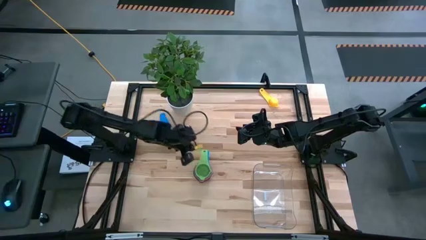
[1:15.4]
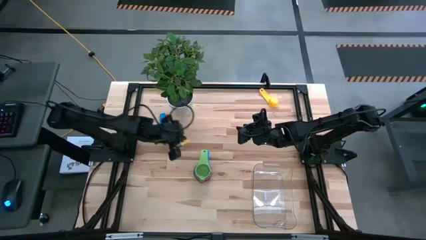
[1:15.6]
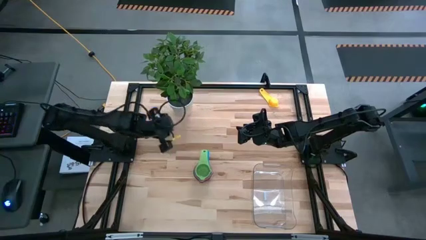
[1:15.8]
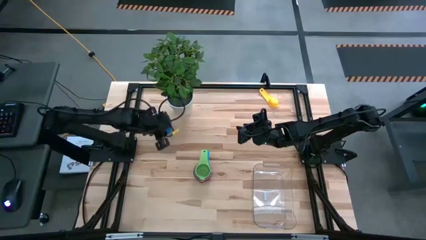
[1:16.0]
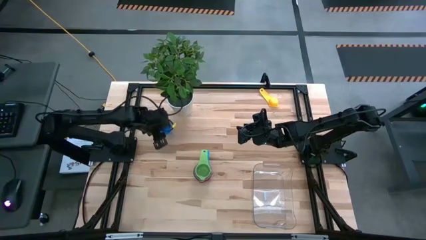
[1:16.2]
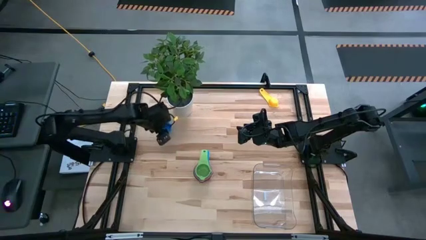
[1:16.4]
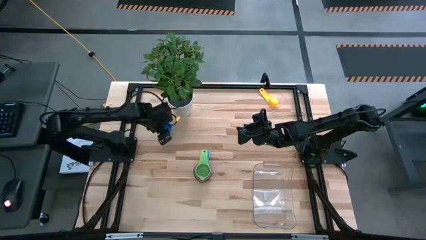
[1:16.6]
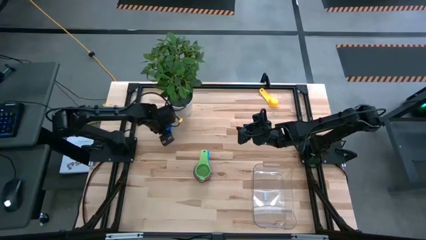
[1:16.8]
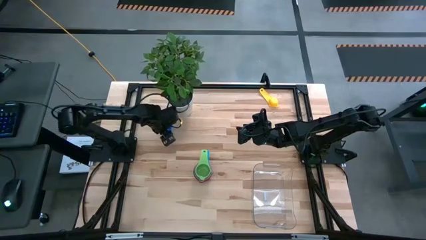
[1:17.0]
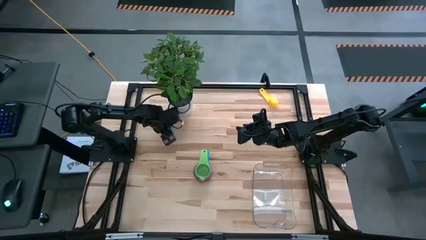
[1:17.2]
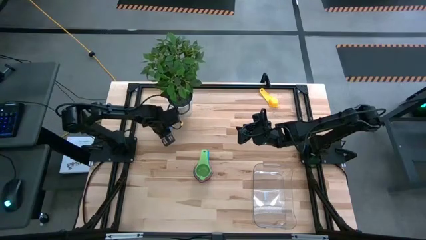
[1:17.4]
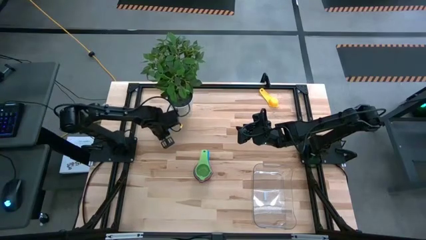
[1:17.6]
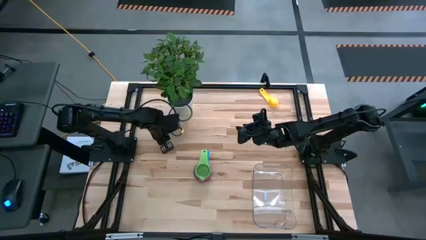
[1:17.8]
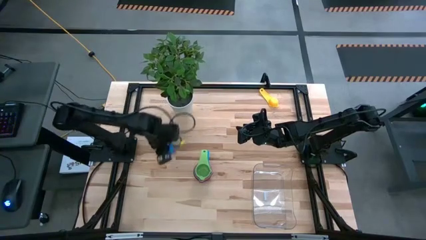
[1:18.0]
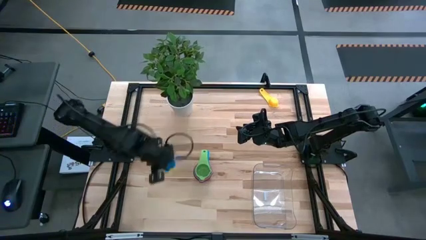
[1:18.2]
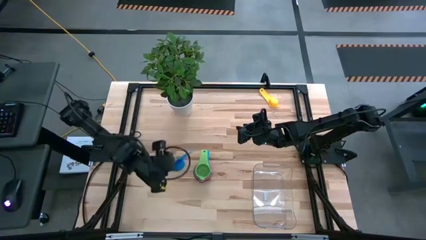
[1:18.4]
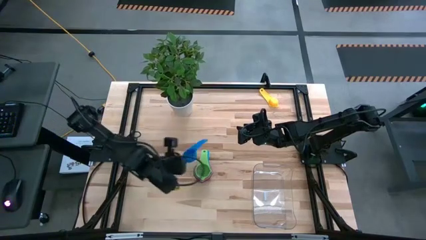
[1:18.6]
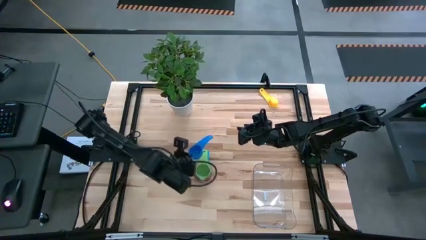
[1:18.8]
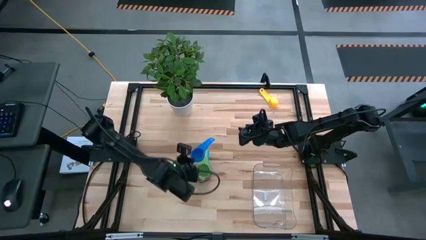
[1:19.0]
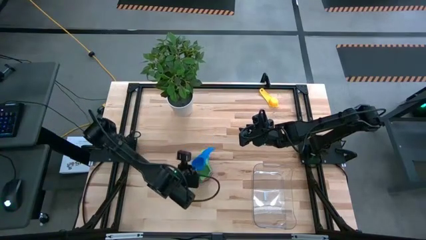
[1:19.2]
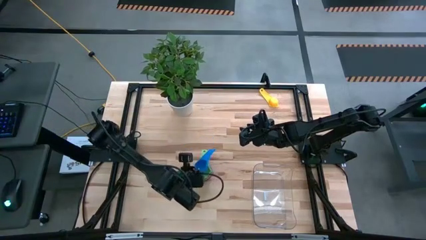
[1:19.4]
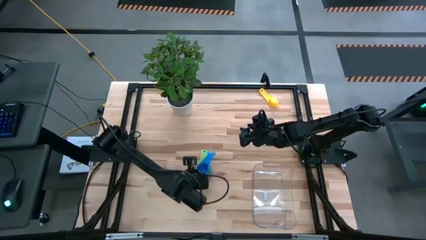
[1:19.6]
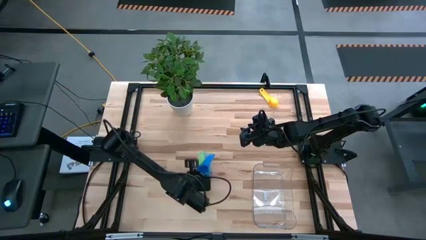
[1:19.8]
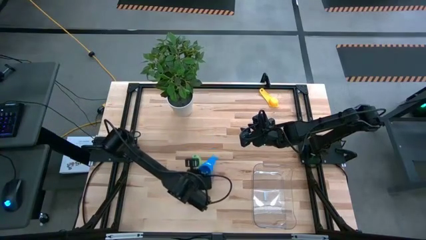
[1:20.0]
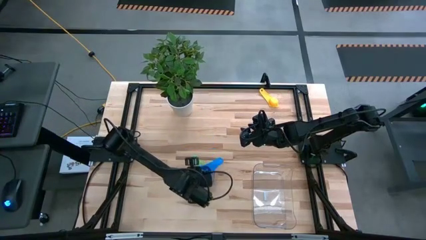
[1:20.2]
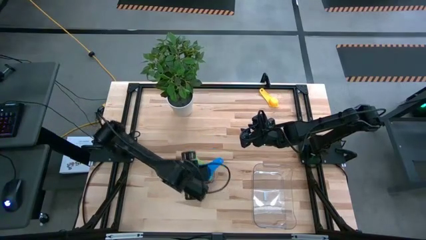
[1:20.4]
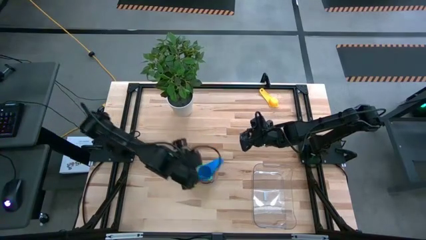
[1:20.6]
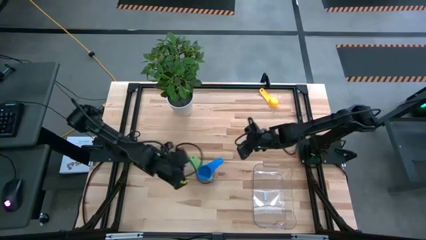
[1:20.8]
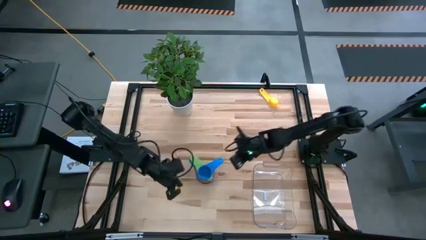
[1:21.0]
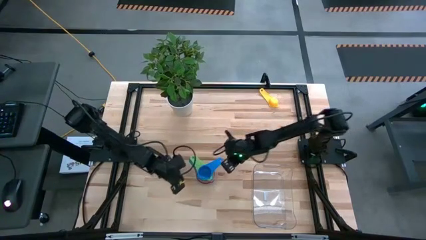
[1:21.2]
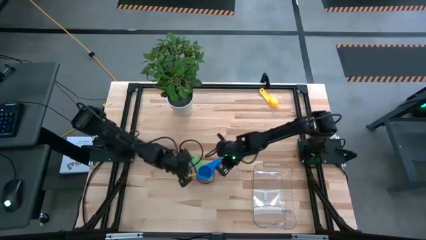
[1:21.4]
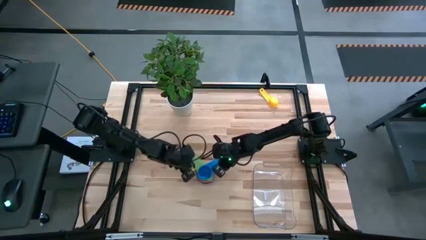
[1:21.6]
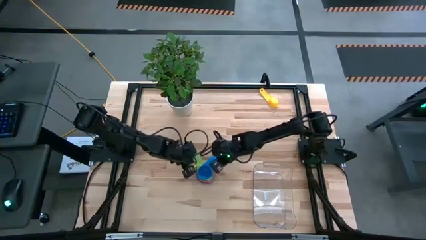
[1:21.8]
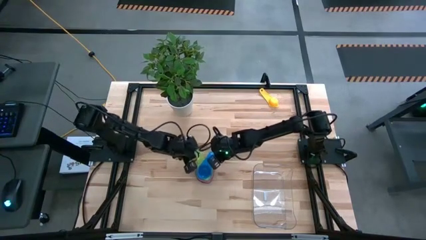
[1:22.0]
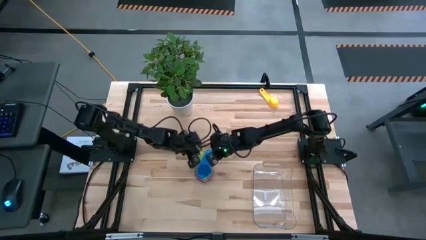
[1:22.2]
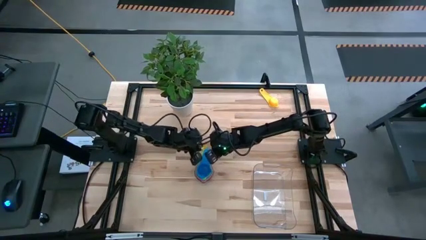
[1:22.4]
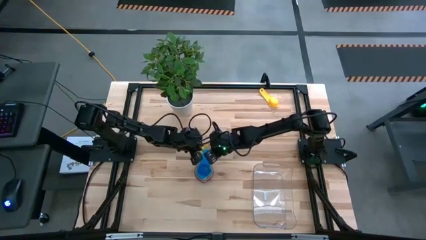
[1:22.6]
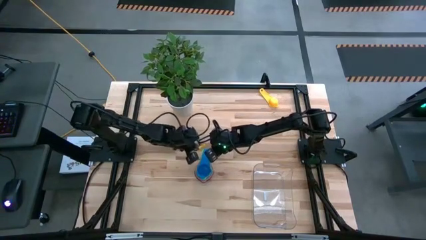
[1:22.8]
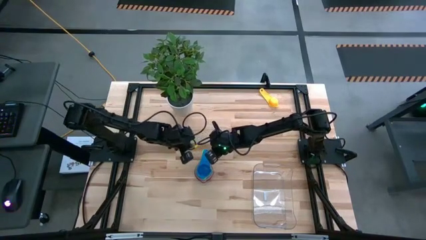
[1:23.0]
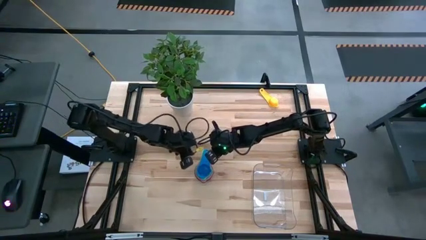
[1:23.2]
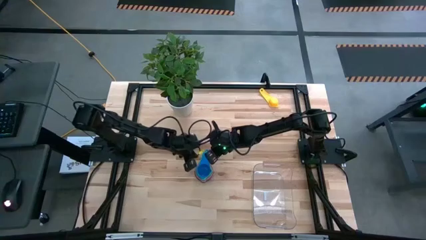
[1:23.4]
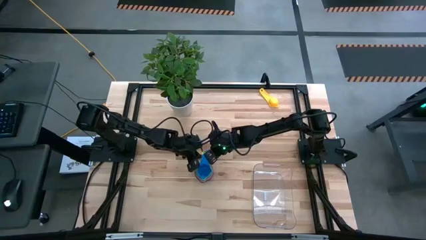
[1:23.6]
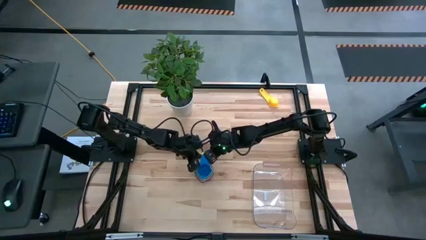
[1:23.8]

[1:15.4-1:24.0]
Task: Nest measuring cups in basket
Stack the blue measuring cup on top of the green measuring cup

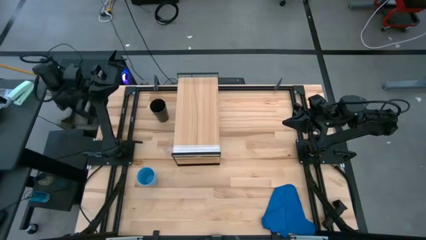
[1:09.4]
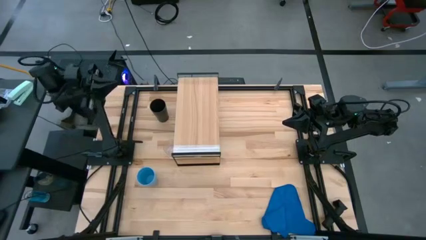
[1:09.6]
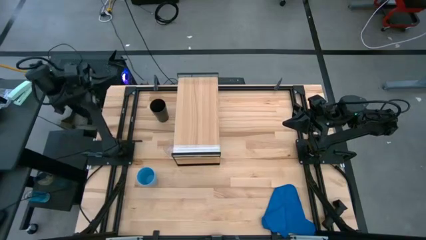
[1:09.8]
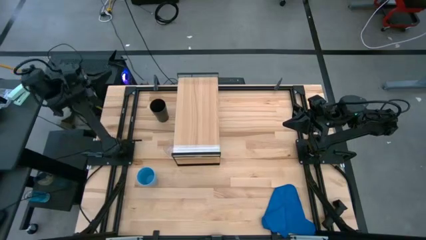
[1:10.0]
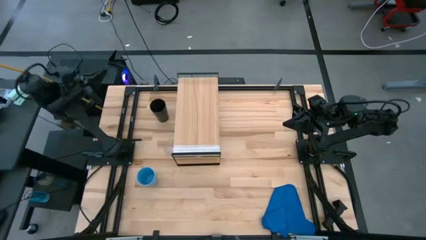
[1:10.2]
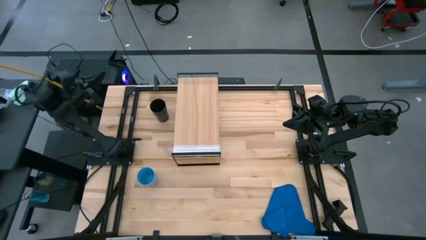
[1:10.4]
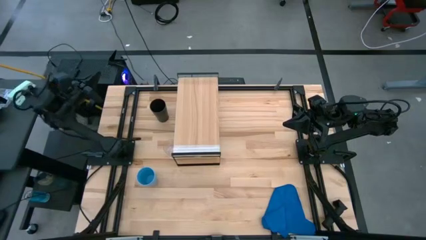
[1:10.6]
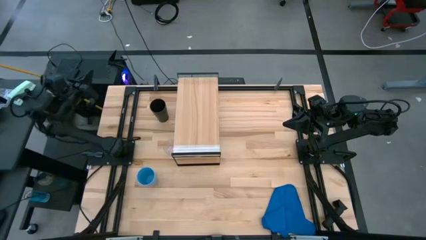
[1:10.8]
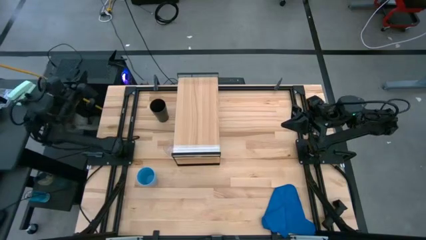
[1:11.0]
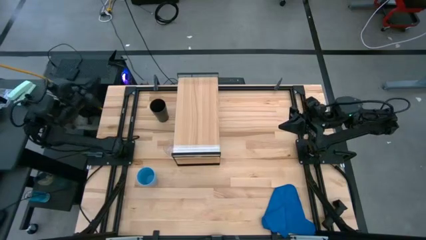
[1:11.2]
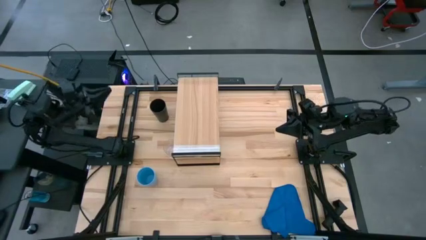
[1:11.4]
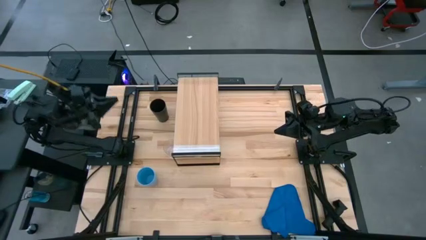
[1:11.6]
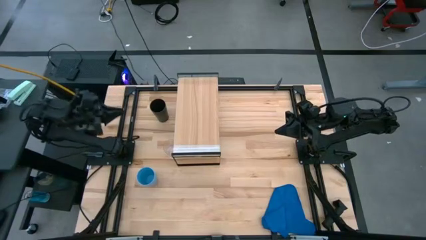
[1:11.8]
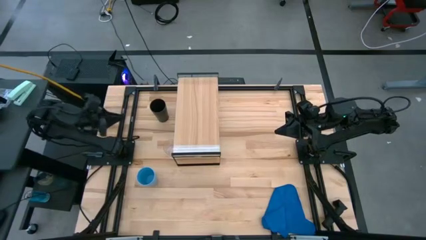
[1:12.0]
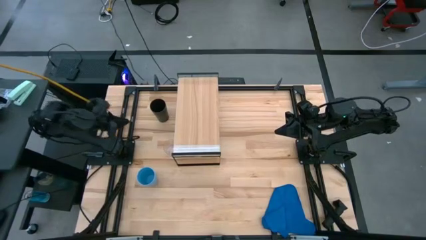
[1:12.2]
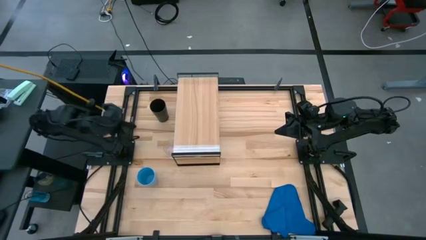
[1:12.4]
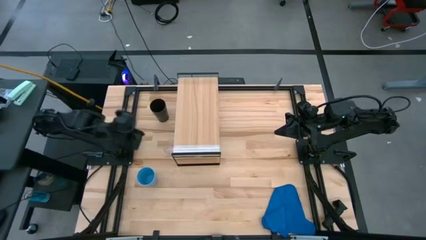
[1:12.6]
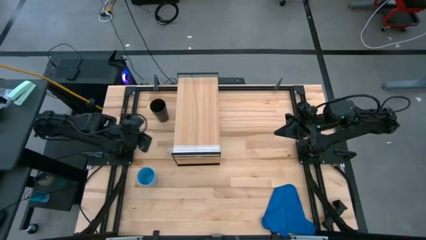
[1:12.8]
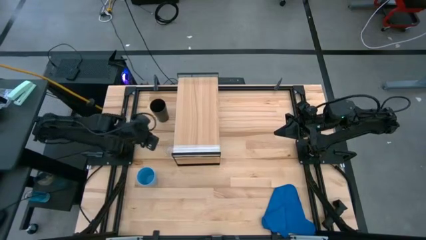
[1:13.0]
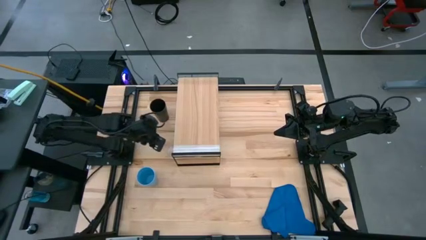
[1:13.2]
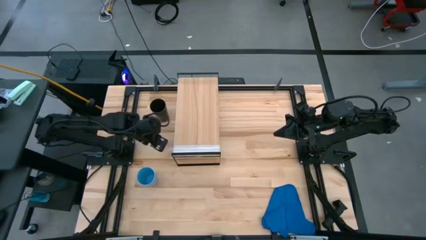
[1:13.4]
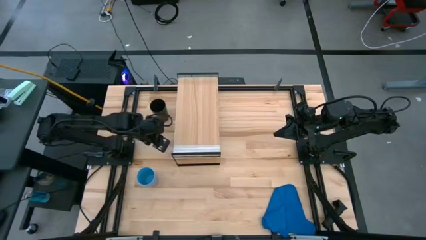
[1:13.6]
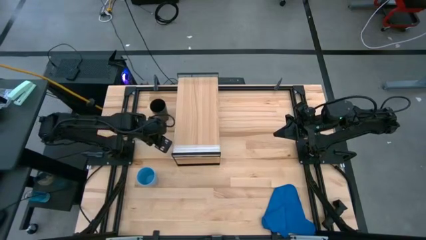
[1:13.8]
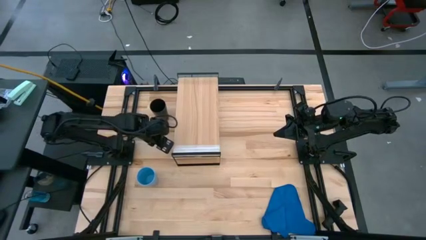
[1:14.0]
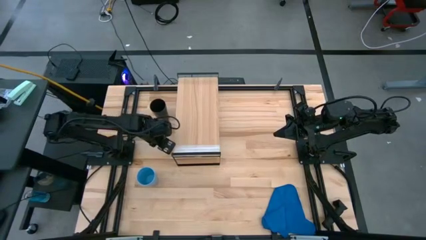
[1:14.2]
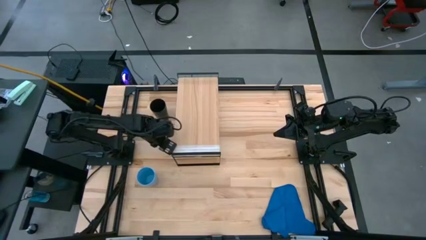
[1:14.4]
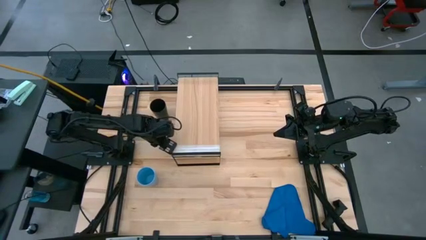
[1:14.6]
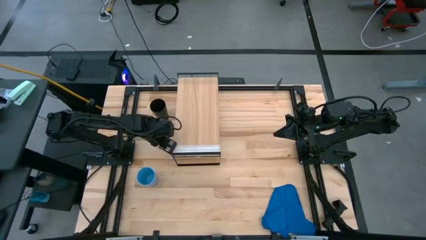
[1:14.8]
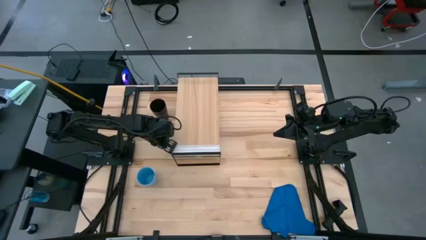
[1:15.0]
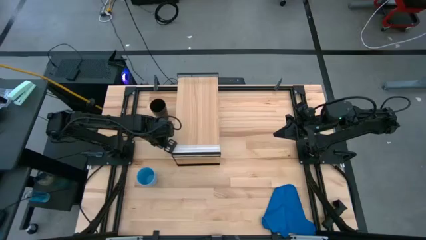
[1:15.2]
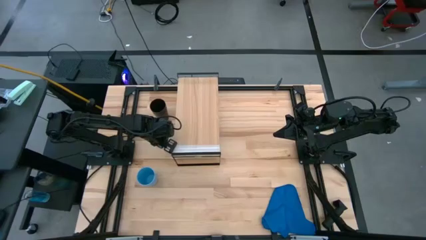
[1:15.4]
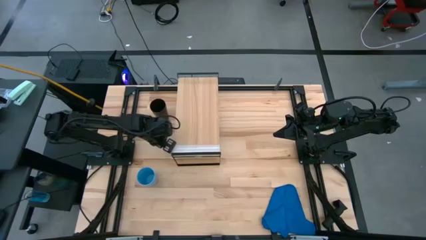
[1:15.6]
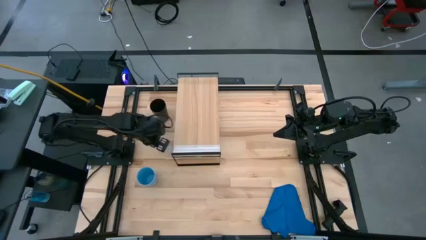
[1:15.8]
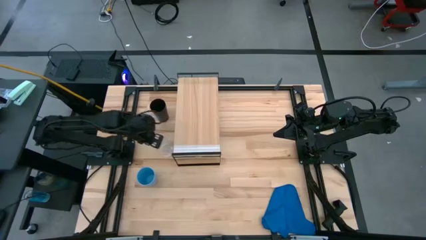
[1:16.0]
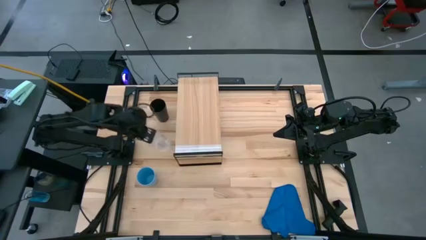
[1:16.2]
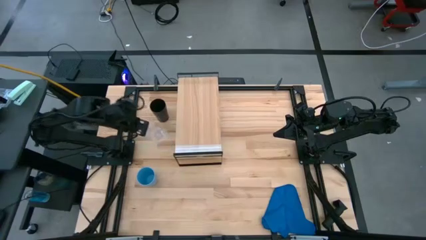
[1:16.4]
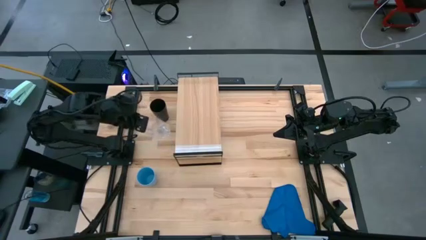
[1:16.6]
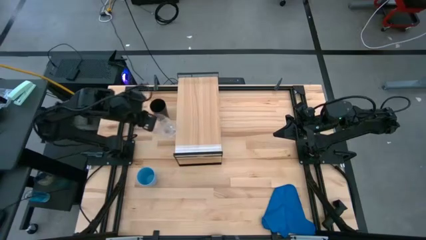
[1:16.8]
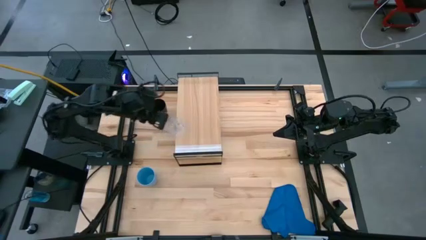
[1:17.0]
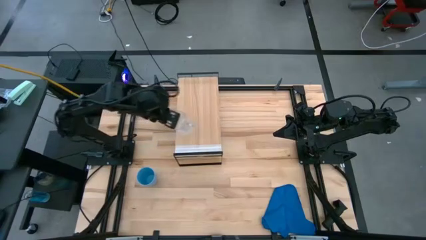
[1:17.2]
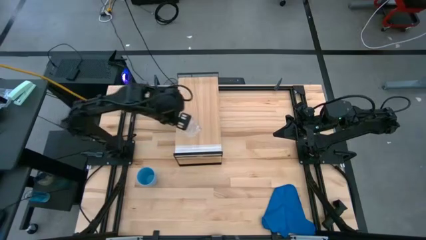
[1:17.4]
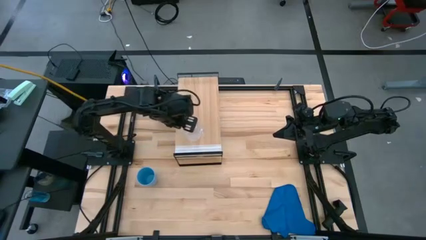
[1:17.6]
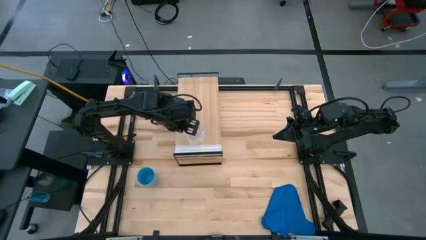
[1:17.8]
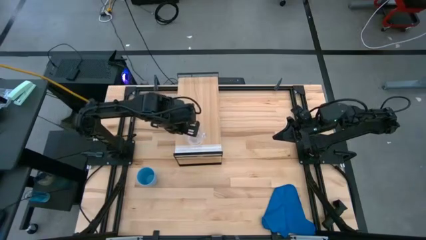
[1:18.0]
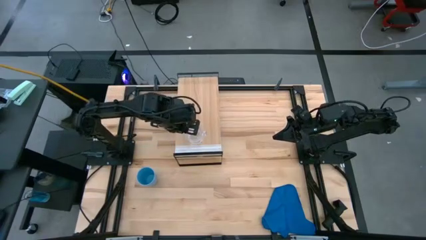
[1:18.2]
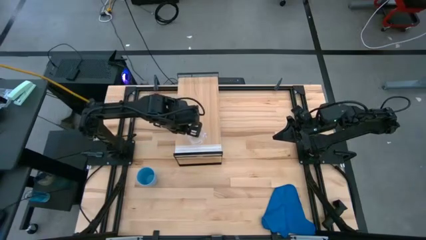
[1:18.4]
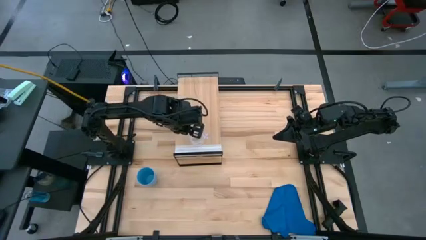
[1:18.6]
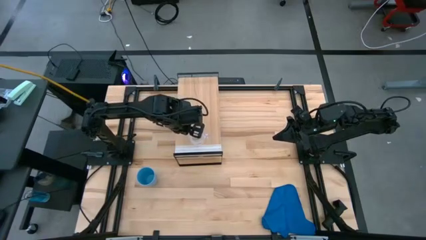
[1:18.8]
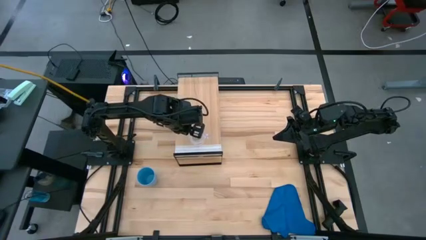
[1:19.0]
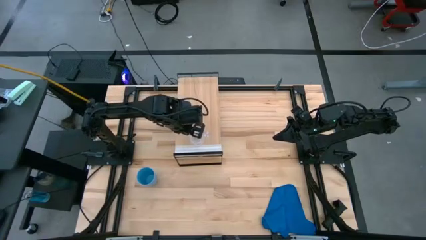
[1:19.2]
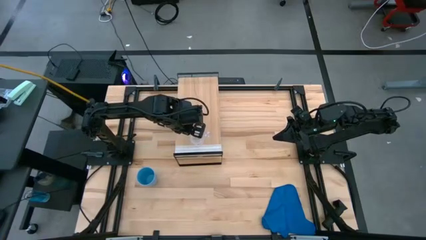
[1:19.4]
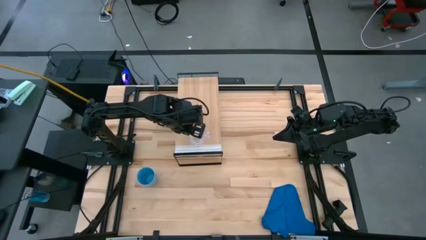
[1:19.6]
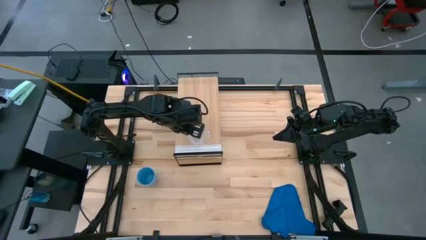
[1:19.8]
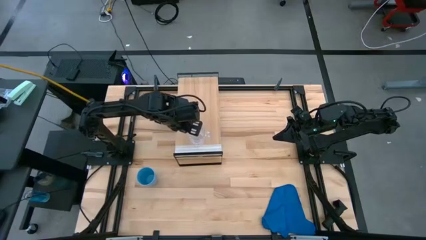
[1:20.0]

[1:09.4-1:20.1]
Task: Stack small to large cups/mugs on shelf
Put the transparent mug on the shelf
